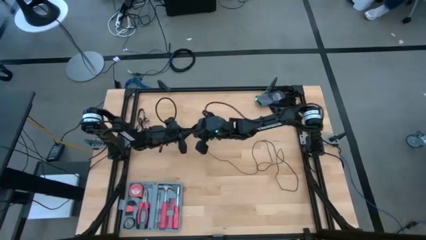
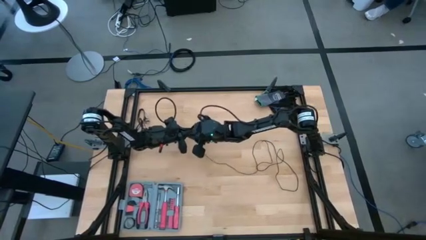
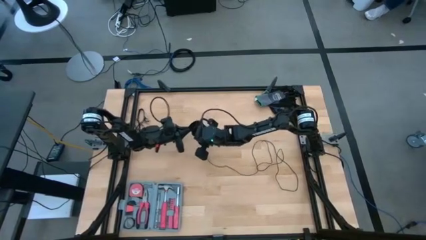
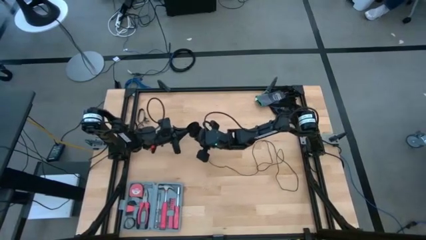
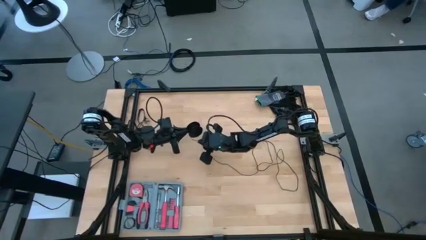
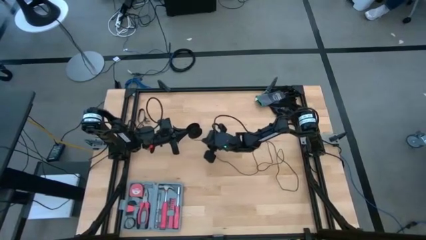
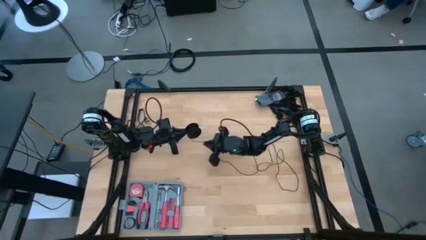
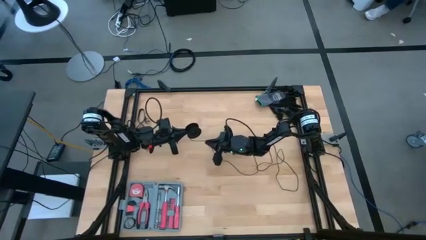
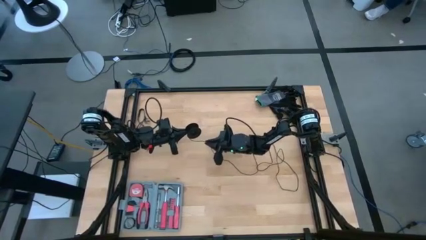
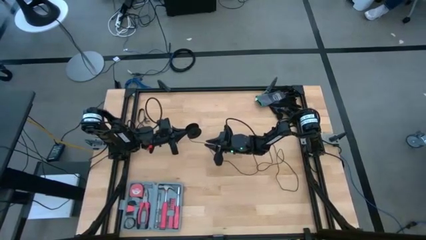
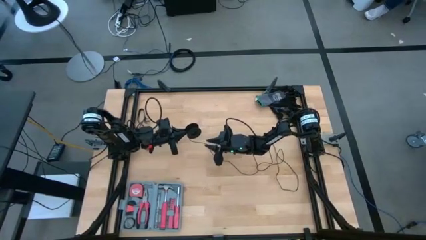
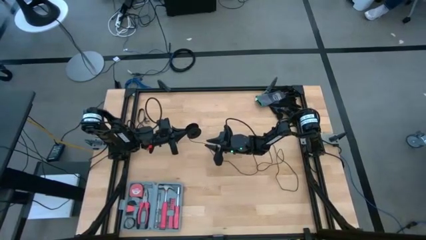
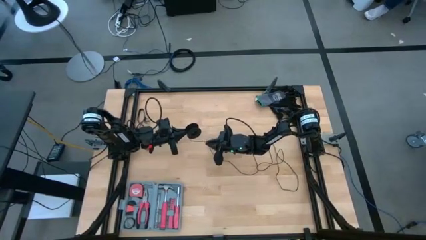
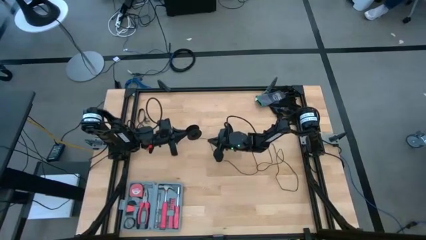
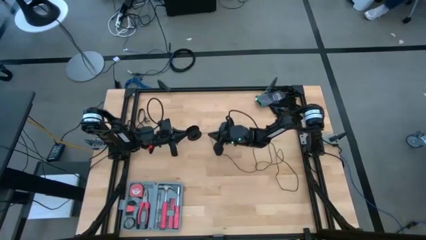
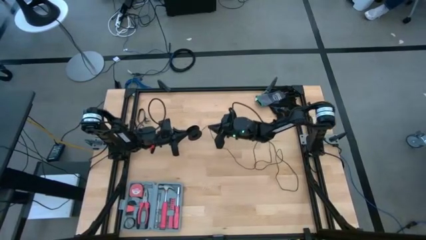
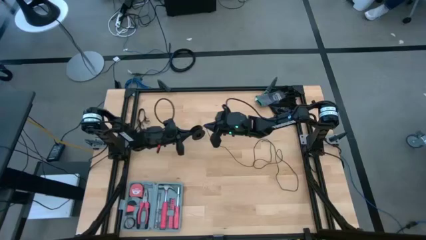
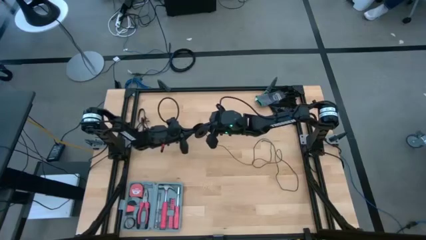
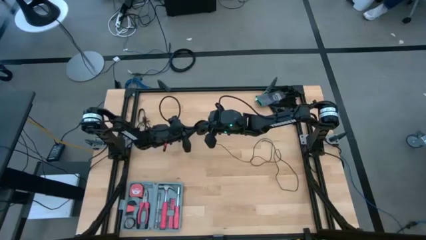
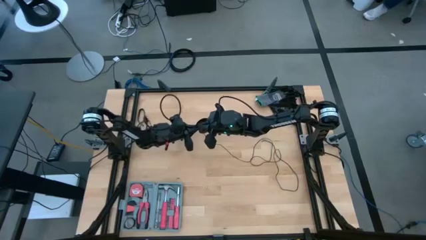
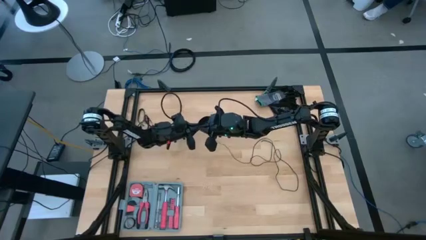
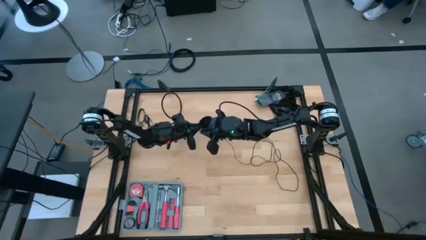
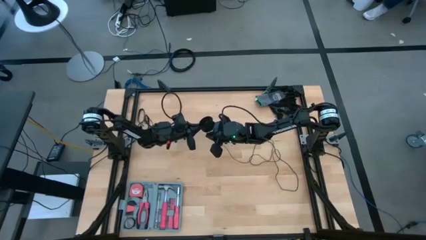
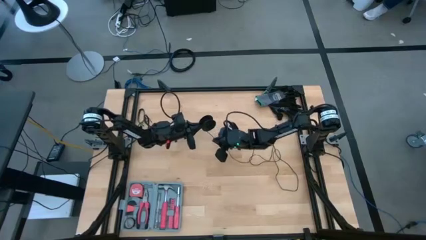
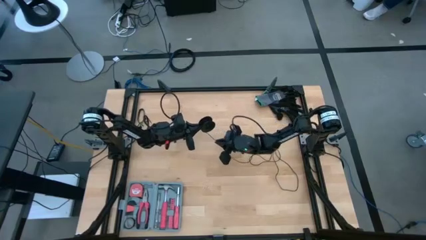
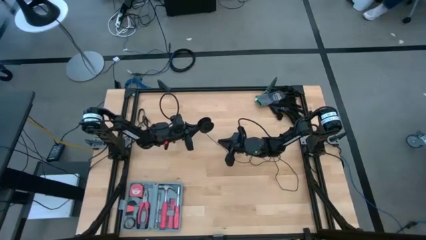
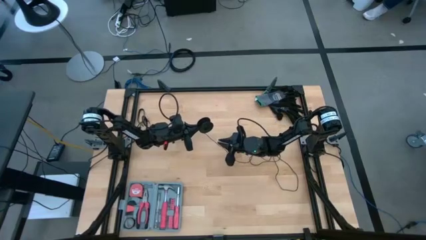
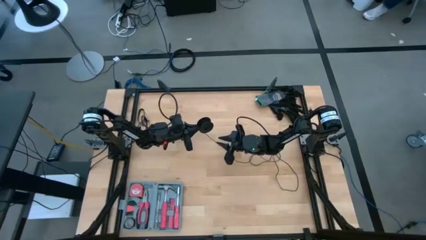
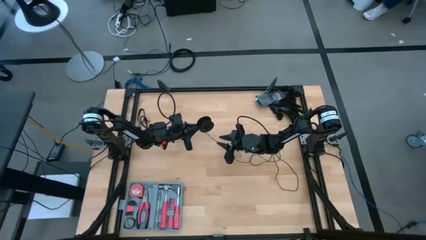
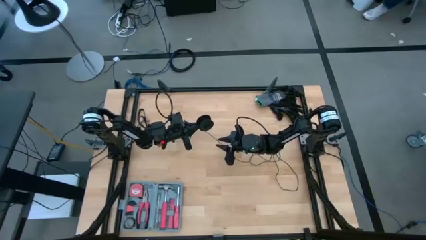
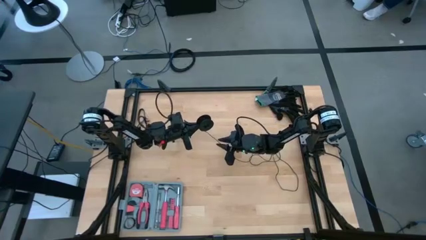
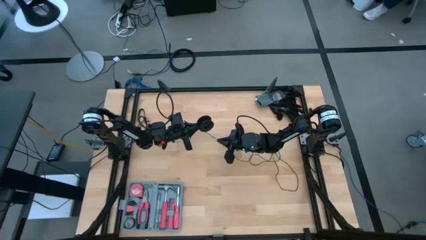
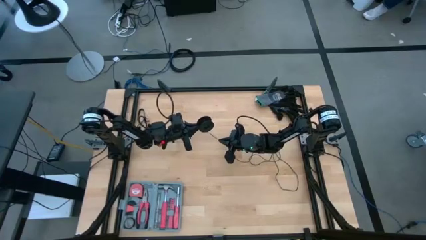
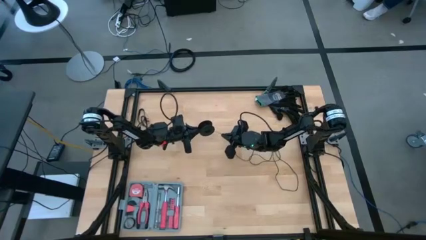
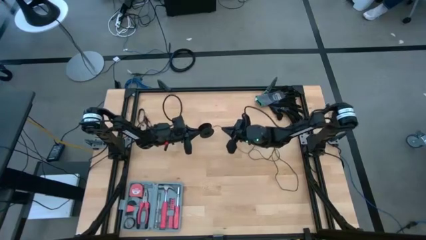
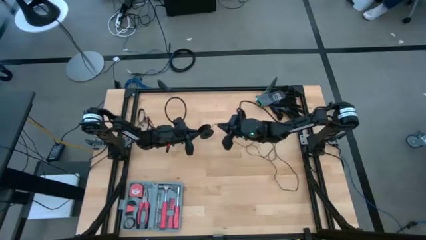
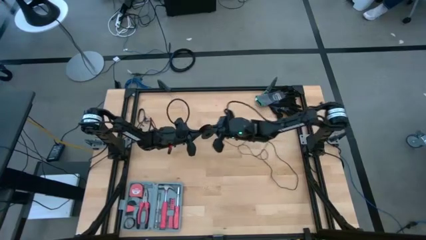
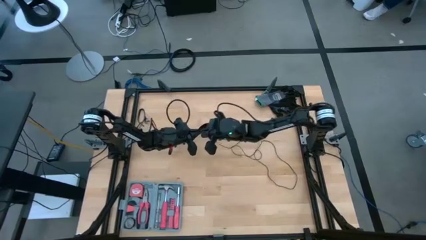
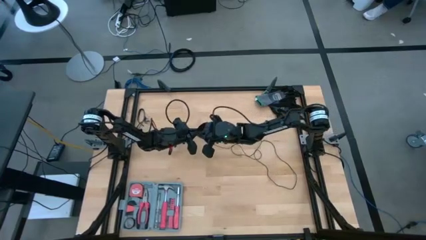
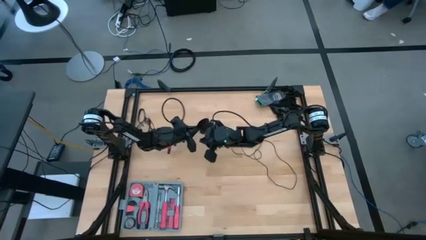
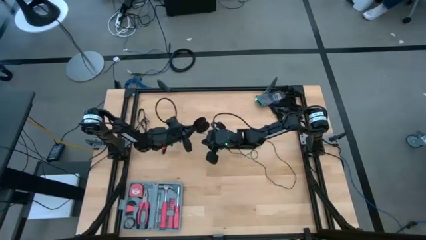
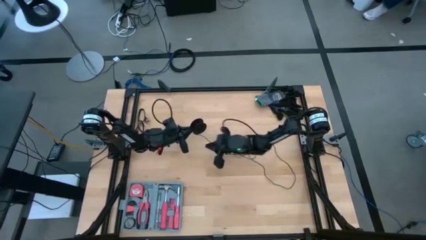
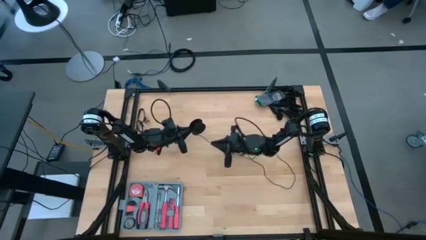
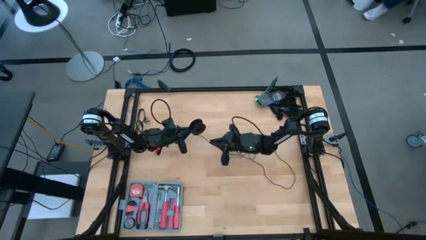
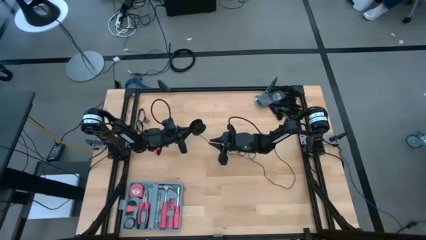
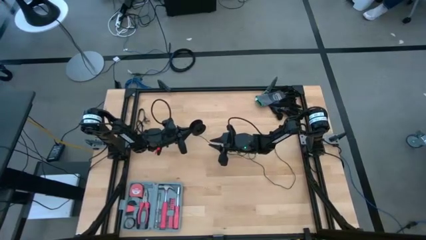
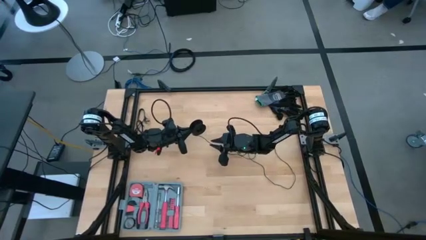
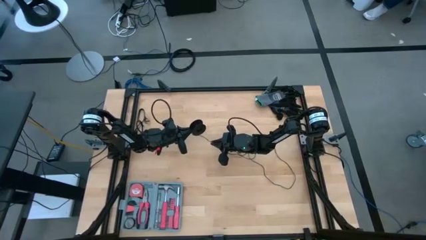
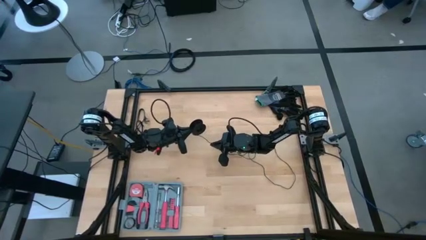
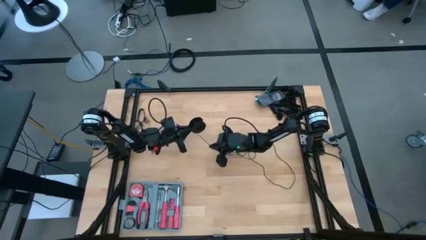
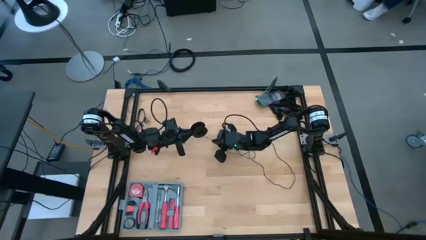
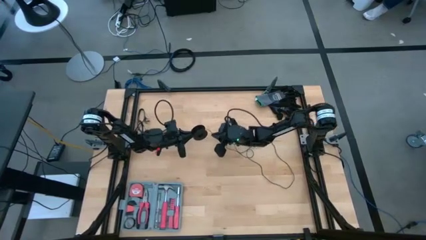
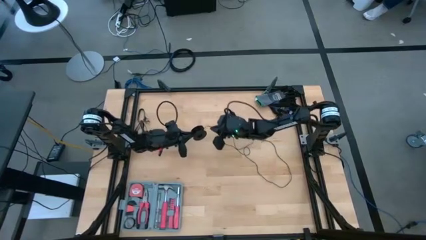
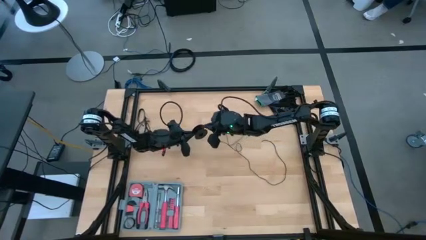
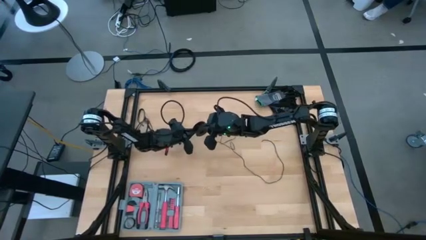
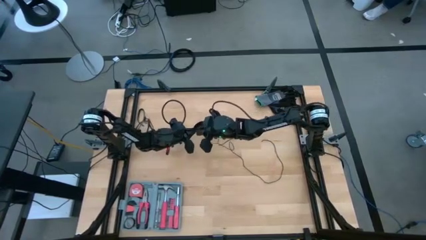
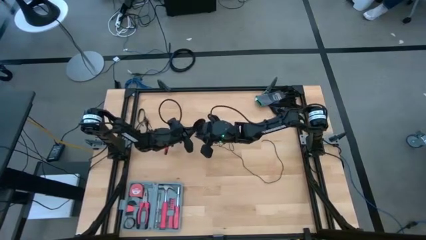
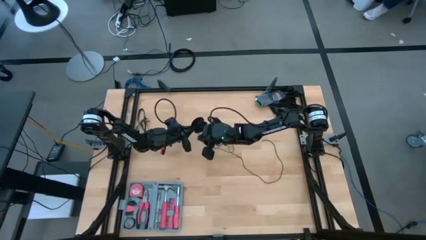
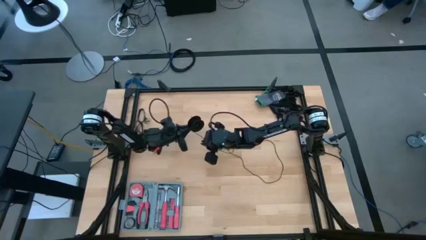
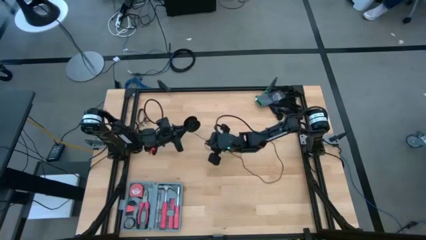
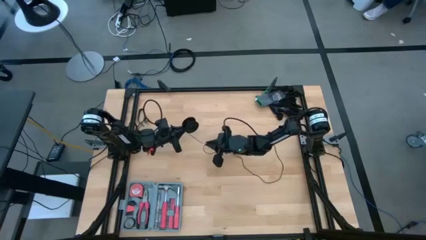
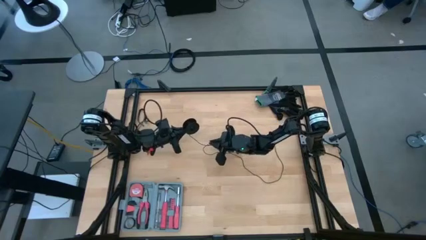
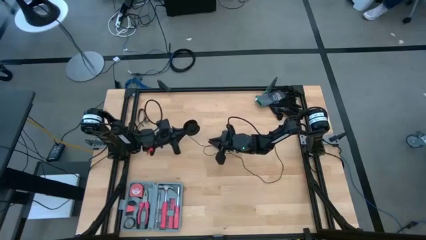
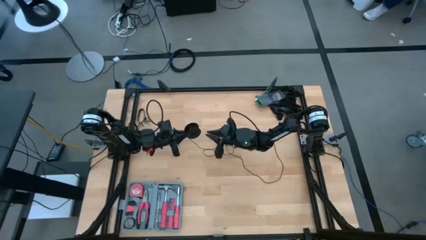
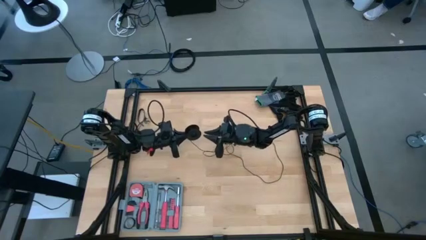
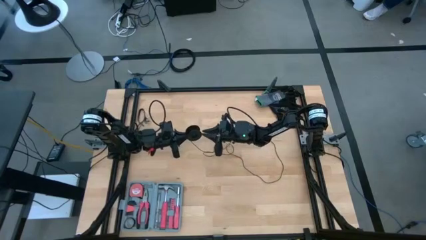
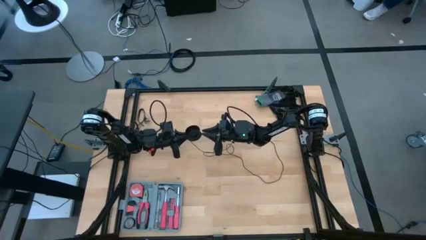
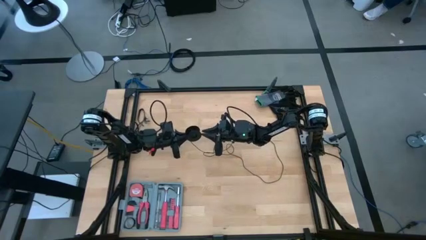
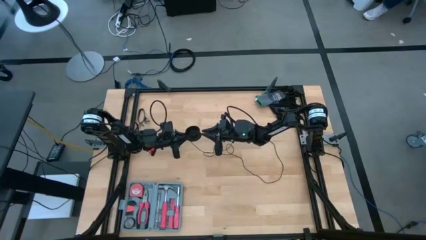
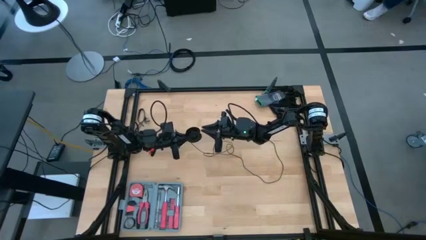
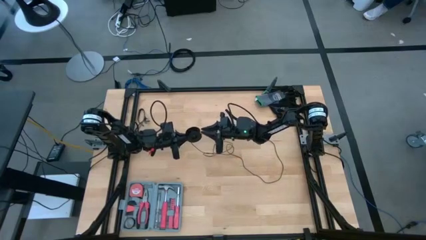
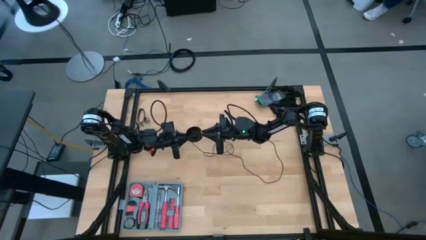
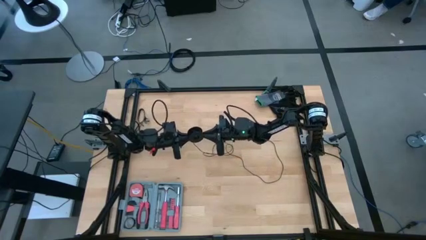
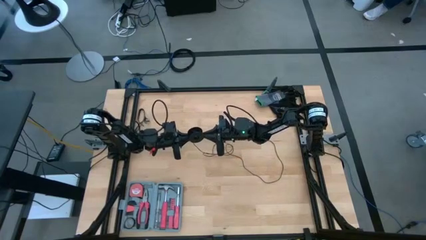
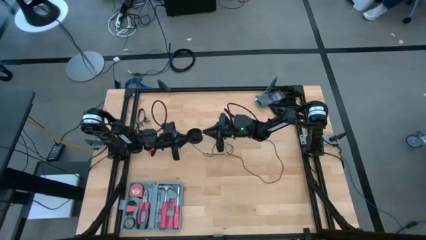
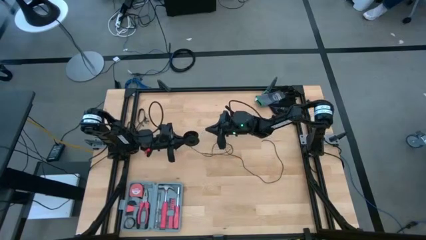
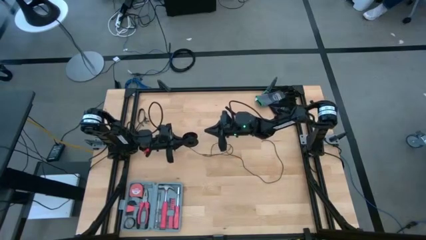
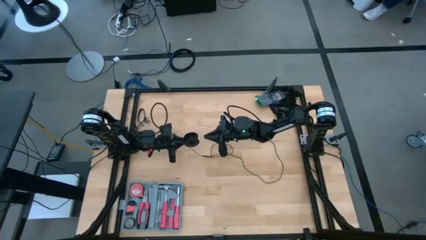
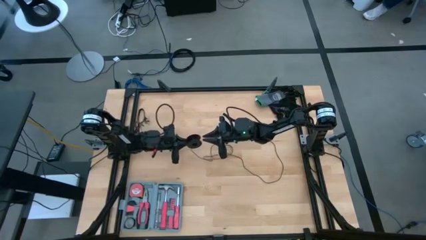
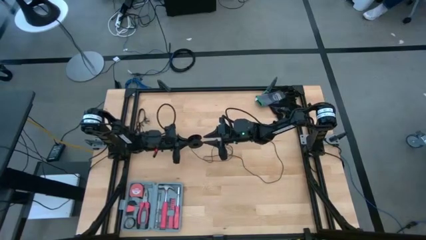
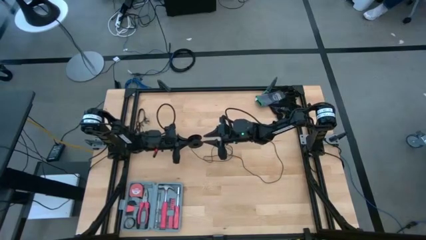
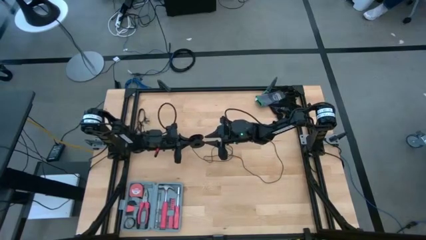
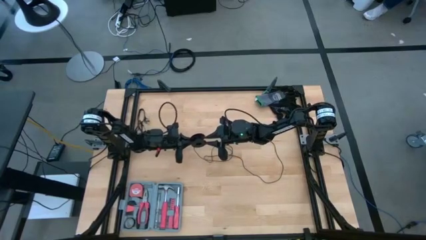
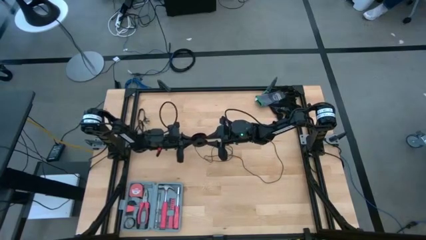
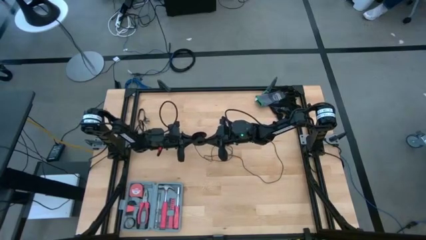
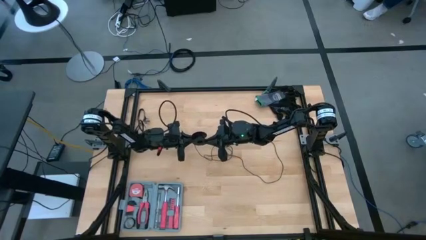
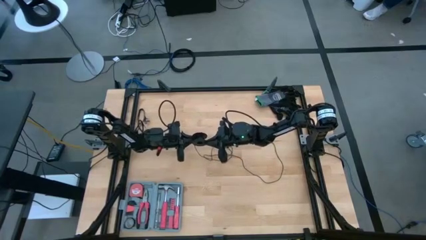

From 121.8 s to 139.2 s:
Task: Coil cords
Coil the black wire on the spool
